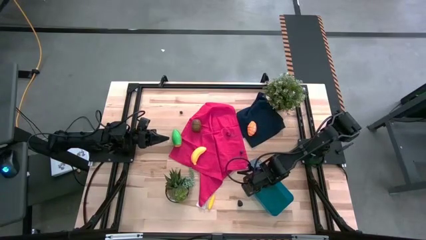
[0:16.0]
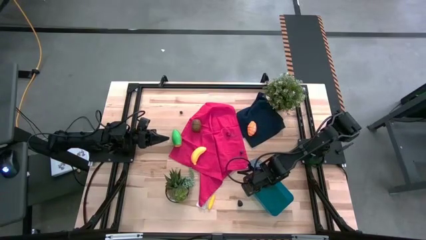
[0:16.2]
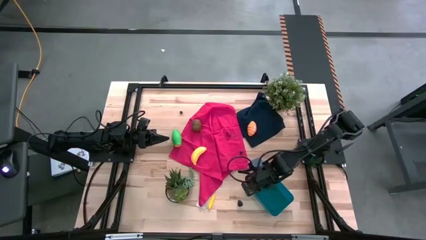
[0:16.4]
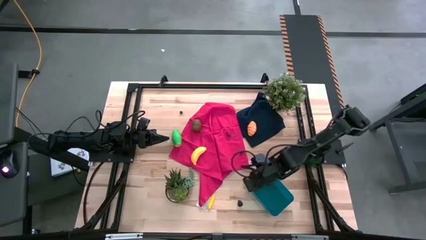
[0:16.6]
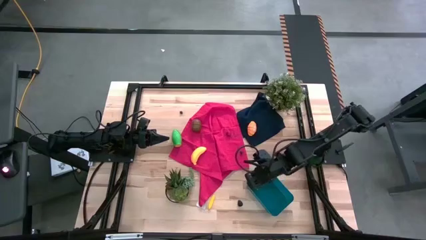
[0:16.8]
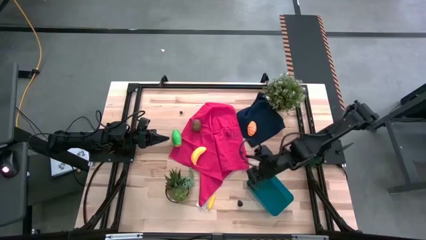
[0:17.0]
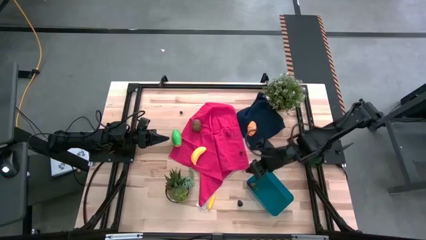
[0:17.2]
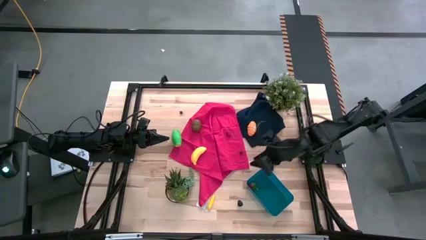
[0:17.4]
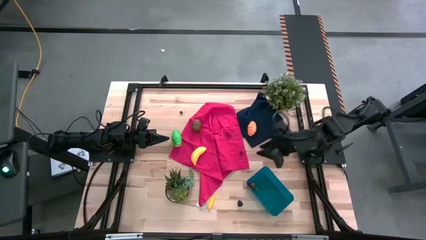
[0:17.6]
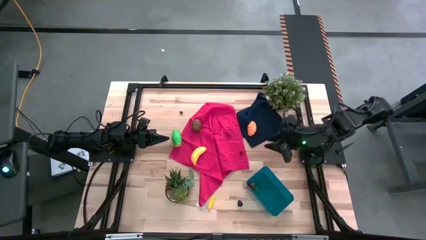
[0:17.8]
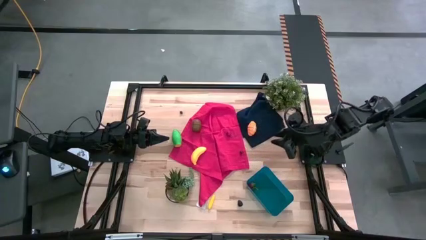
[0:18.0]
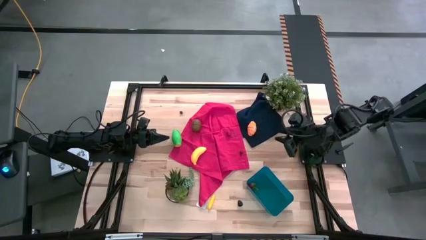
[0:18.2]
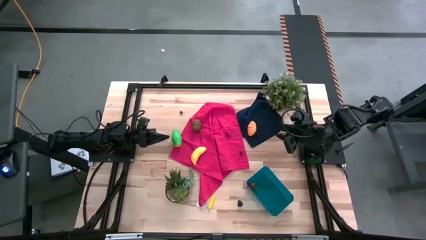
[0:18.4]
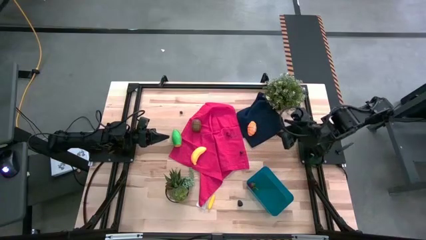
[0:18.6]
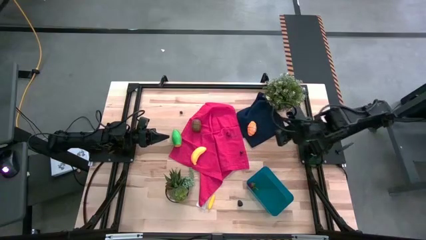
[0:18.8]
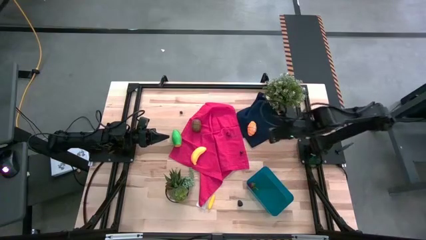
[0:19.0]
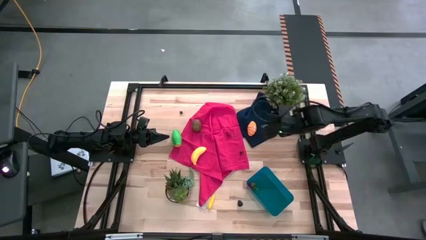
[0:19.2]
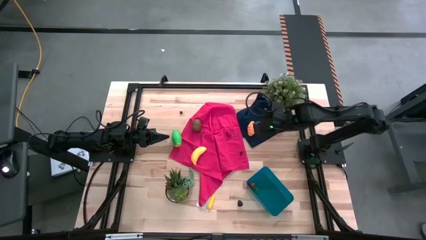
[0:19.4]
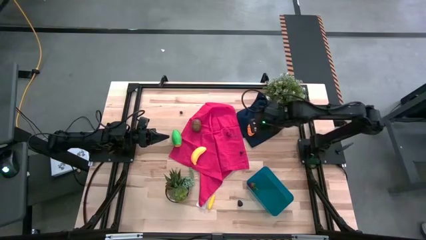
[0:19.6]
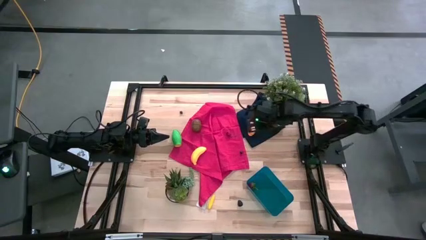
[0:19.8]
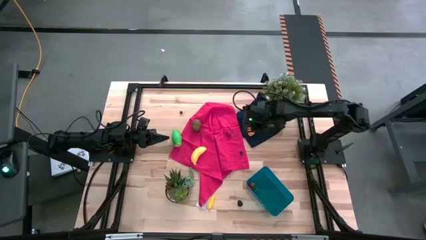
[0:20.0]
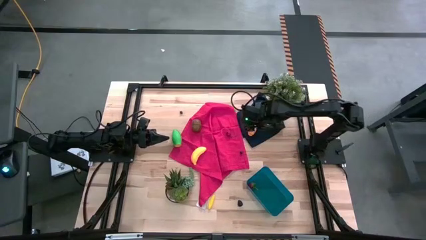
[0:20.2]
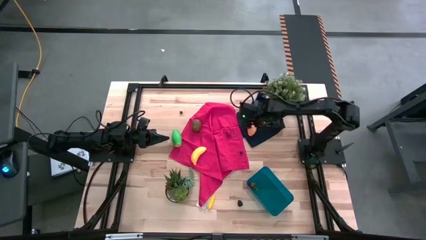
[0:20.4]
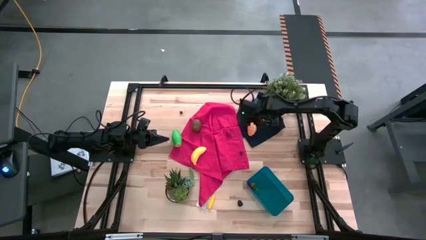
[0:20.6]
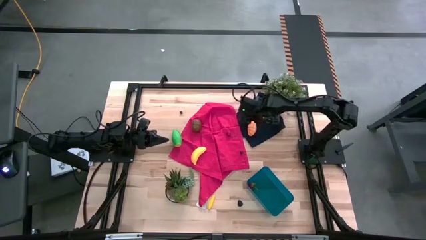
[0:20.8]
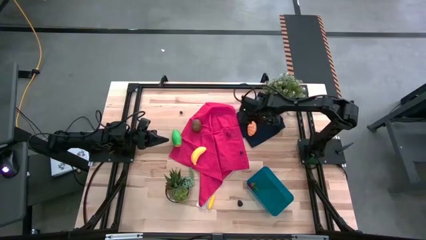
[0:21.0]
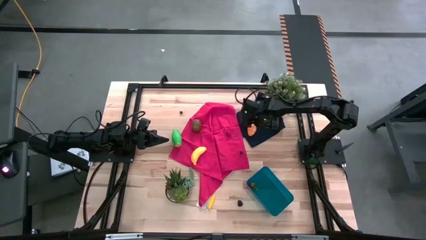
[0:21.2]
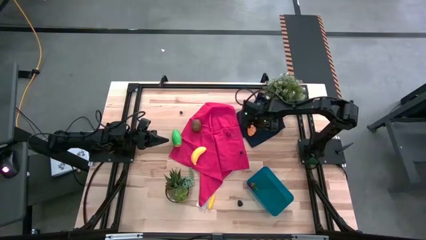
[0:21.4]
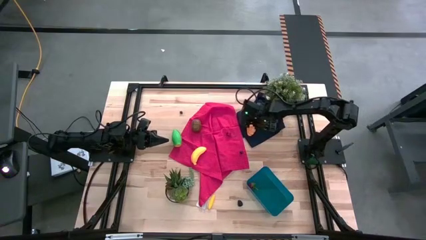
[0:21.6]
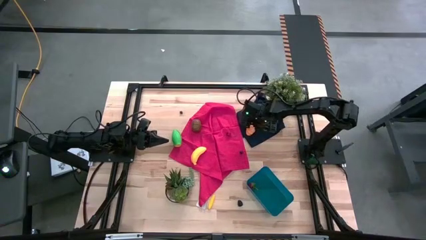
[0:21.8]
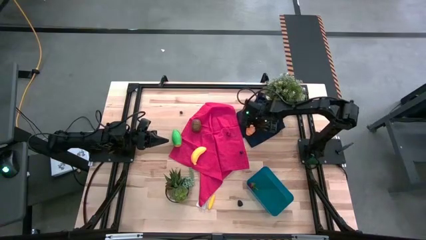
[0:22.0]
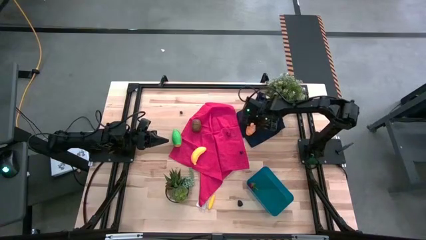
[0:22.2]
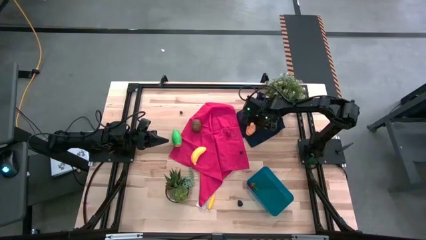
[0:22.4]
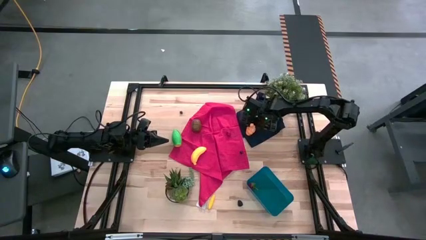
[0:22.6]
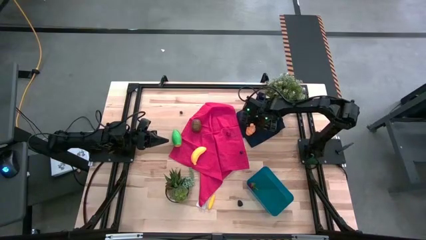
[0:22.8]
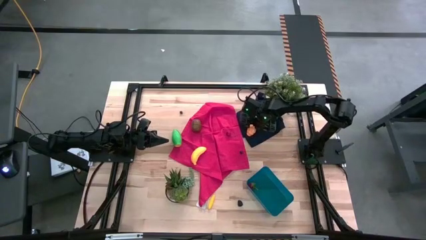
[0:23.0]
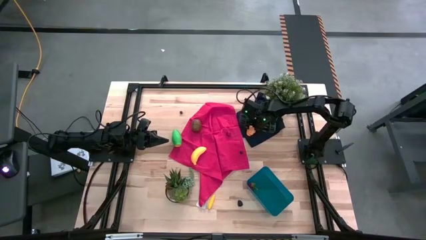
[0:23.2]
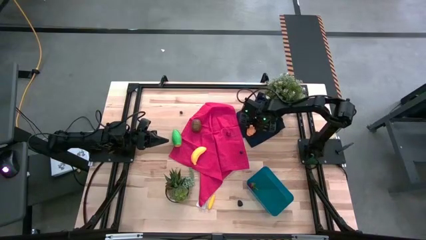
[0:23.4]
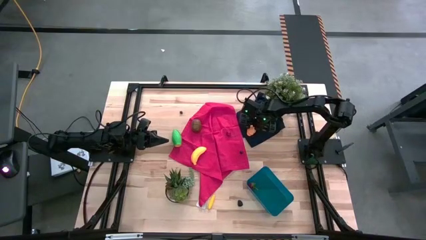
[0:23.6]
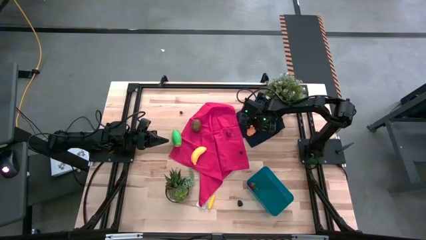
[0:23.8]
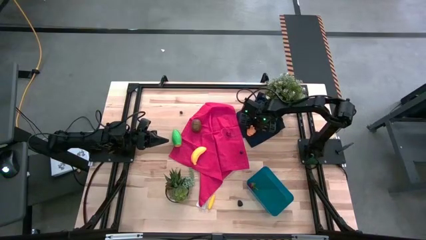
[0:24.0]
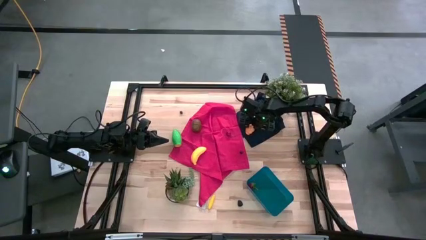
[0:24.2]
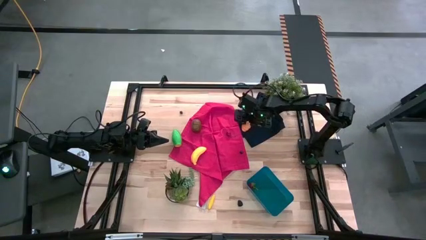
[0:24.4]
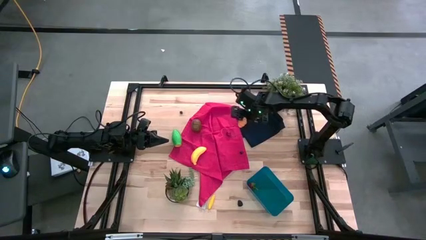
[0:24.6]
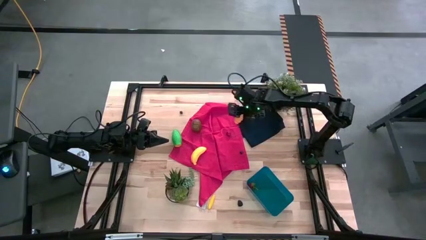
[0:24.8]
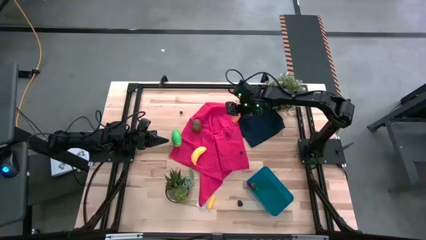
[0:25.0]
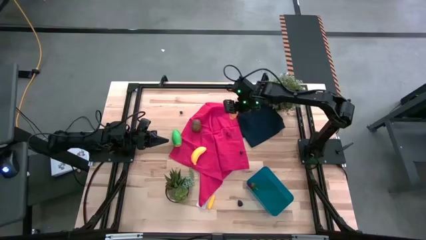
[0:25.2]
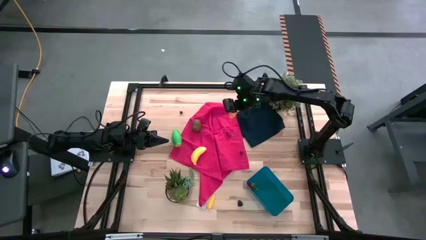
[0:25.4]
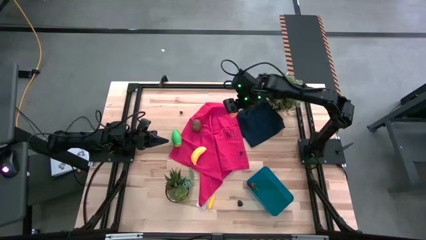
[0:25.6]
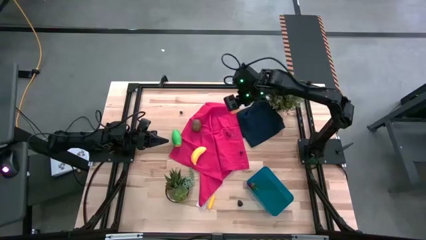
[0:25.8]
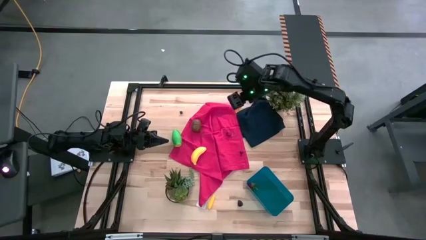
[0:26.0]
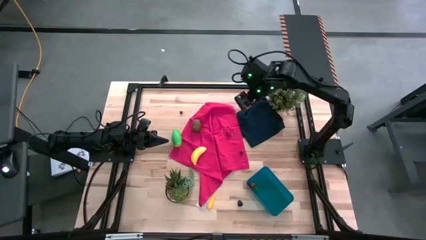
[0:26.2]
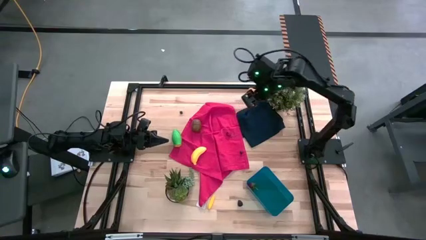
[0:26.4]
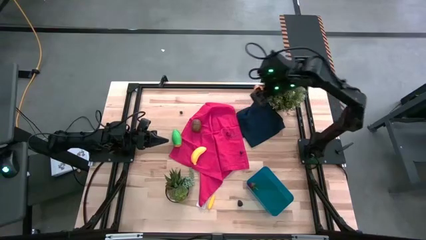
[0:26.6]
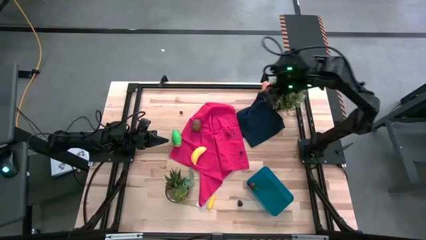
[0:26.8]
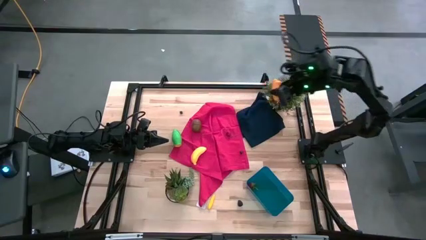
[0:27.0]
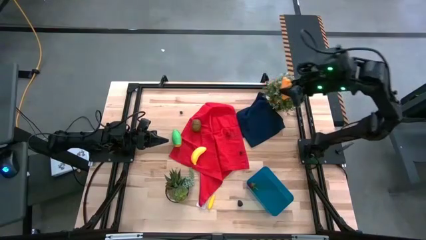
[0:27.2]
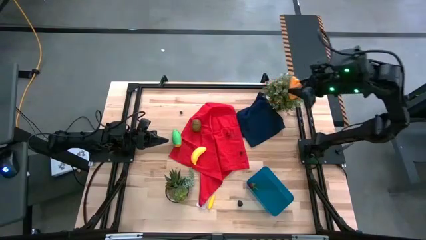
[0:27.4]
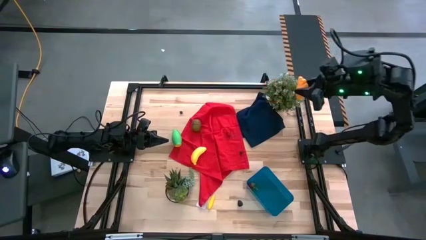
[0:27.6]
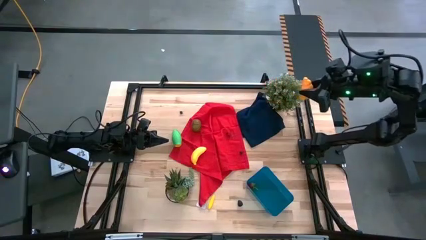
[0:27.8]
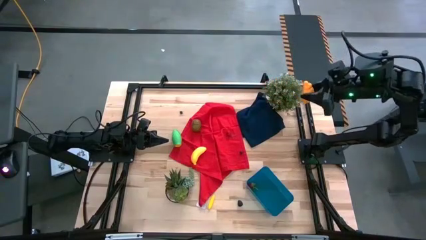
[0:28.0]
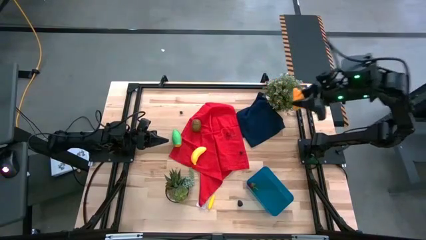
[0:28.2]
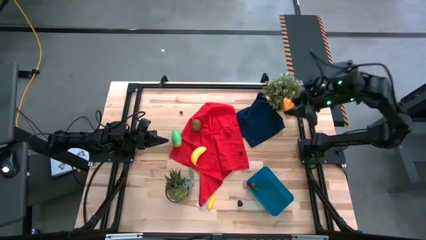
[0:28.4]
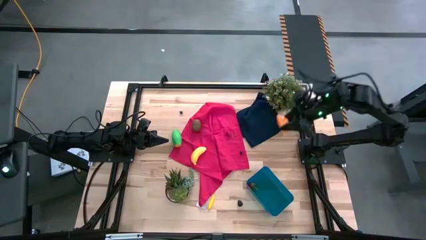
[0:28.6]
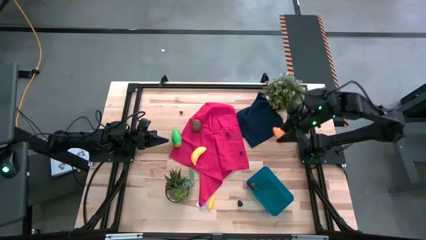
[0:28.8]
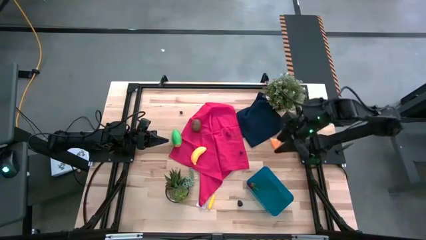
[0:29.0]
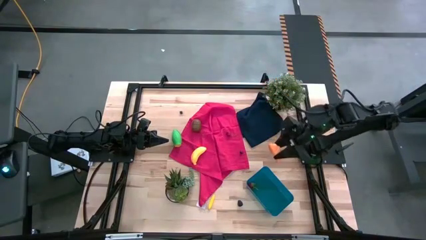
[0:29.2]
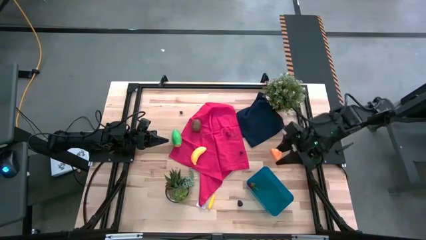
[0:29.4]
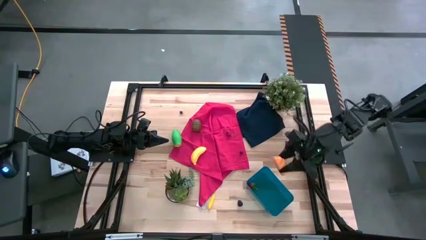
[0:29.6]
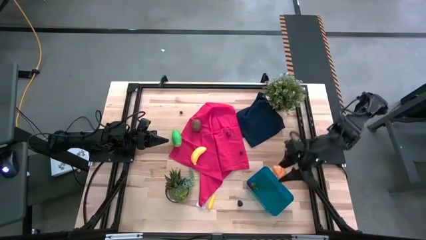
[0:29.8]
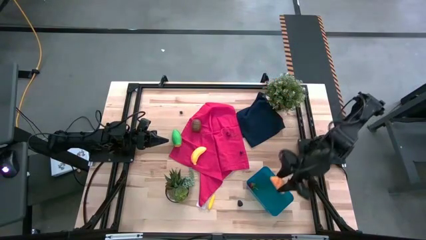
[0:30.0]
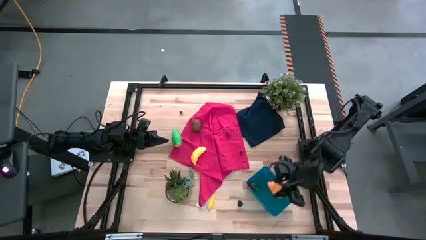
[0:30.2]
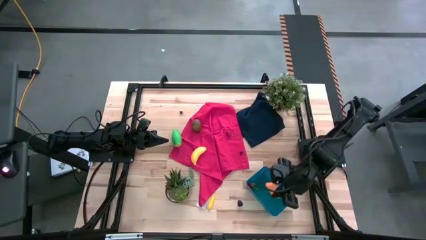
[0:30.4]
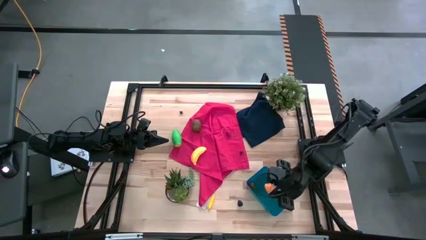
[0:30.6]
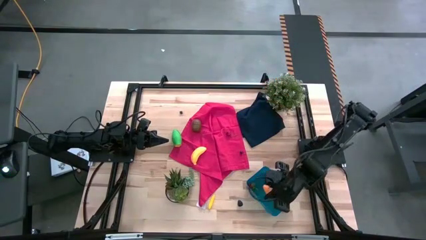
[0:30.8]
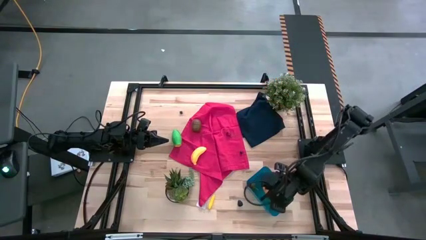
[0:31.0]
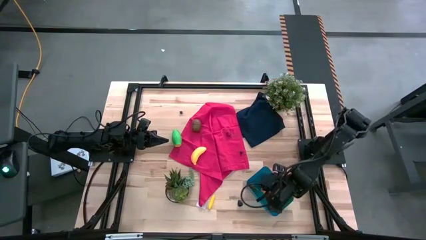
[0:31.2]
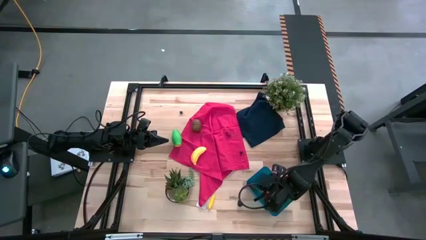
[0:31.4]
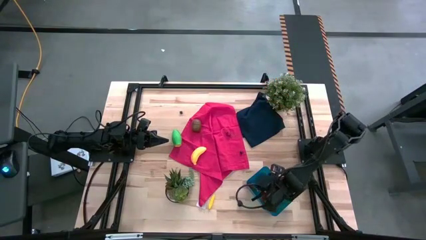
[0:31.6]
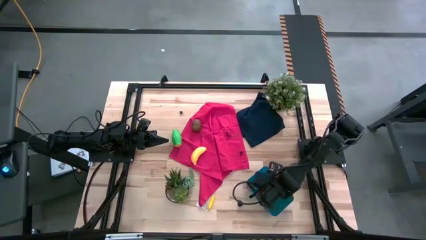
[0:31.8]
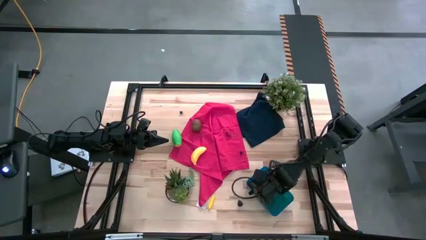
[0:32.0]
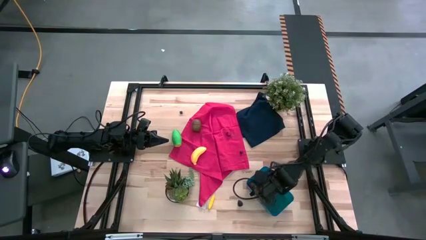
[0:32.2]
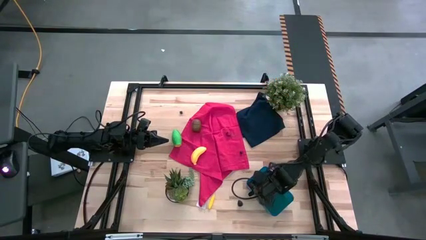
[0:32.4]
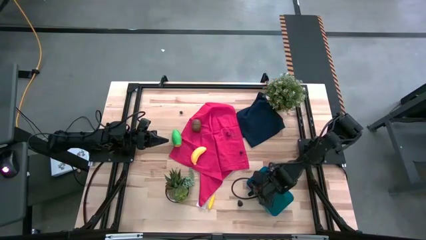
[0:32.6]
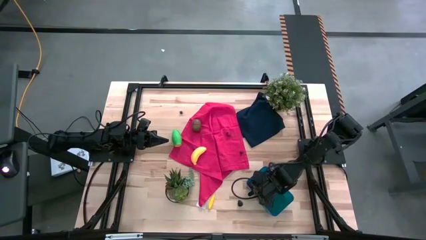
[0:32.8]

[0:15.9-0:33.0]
Task: Pick and placing Produce into tupperware
Put the croissant into the blue bin
